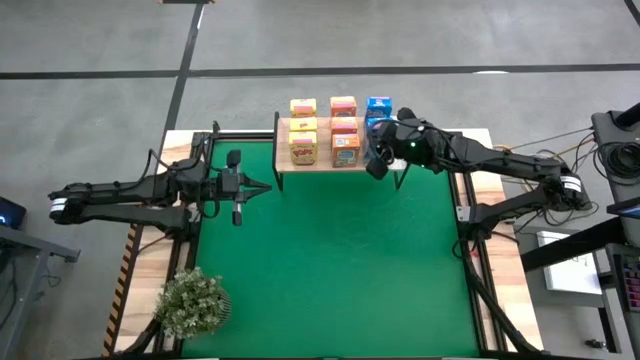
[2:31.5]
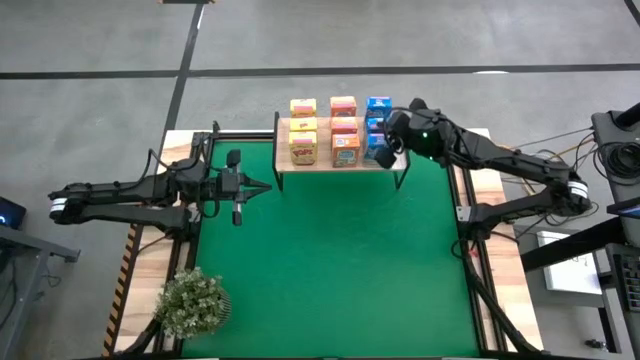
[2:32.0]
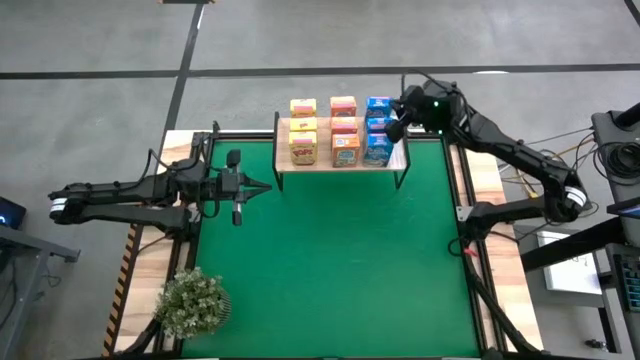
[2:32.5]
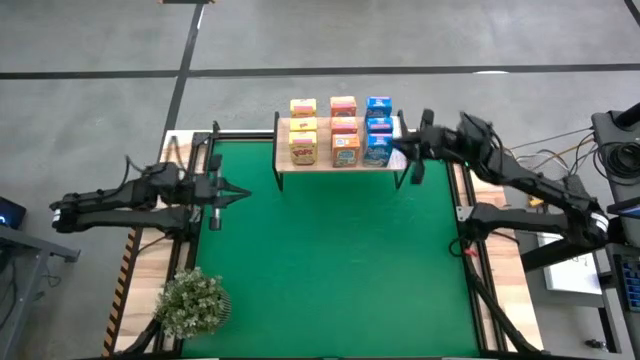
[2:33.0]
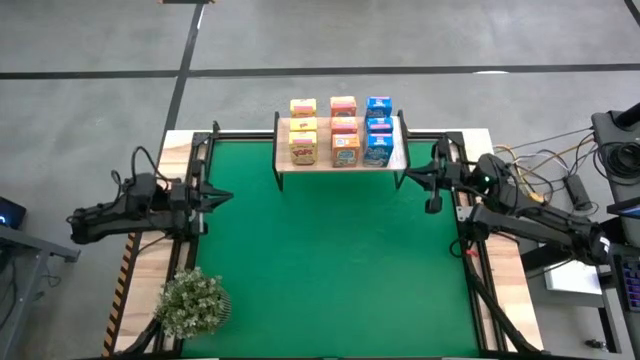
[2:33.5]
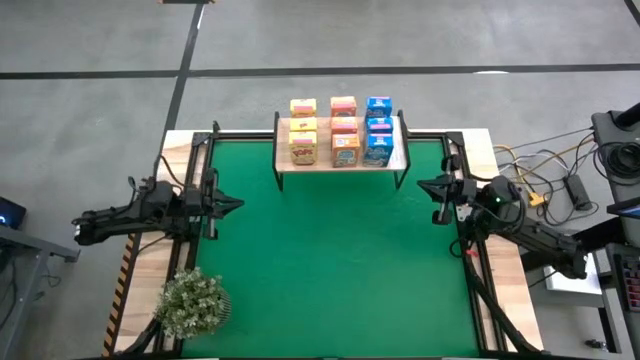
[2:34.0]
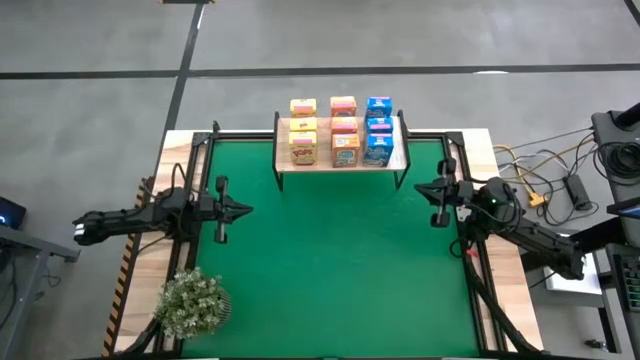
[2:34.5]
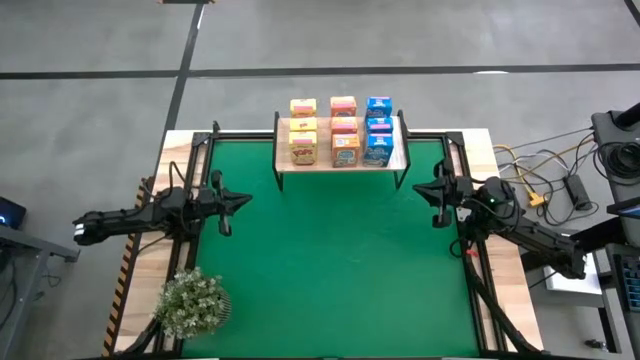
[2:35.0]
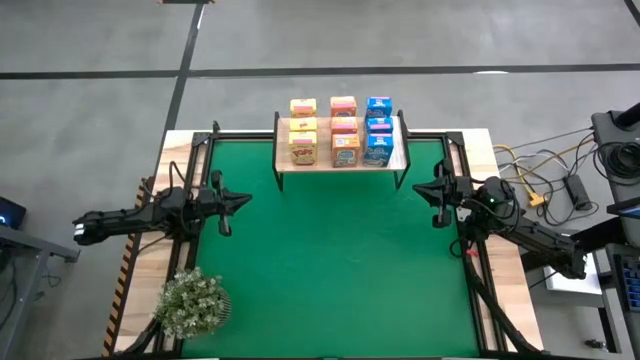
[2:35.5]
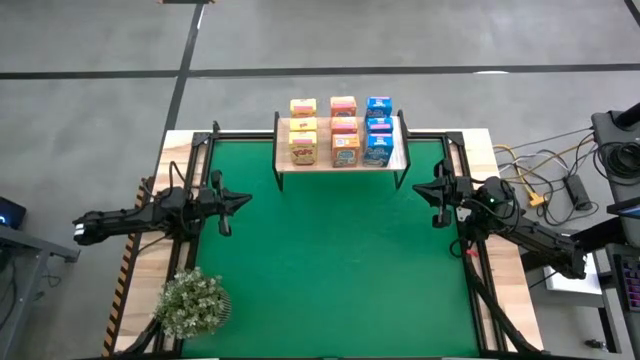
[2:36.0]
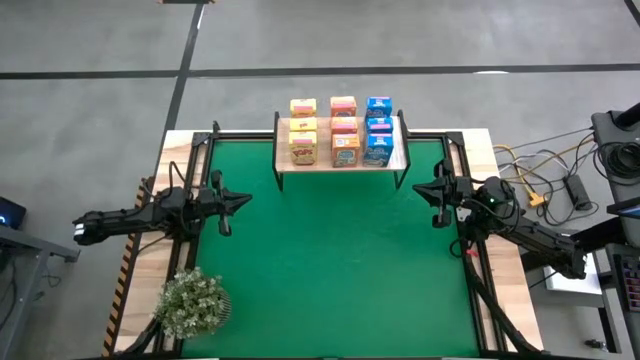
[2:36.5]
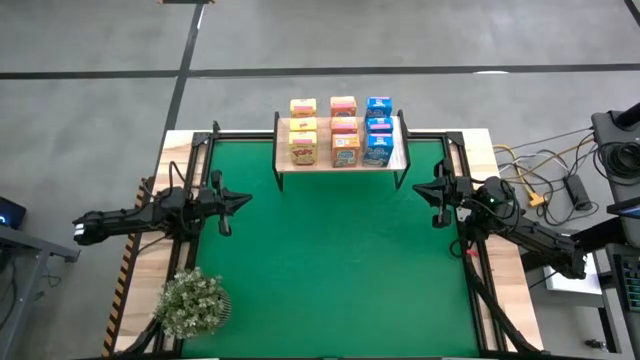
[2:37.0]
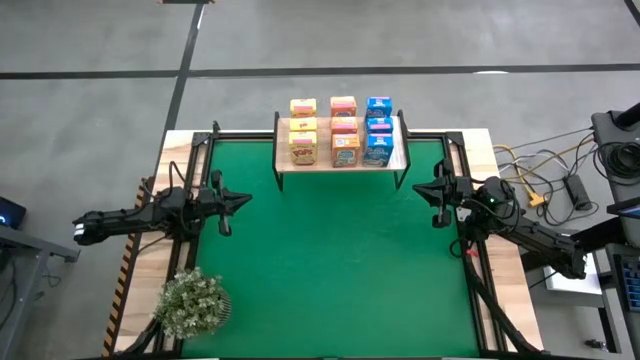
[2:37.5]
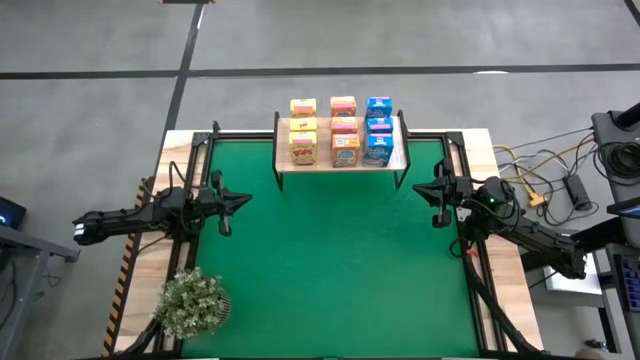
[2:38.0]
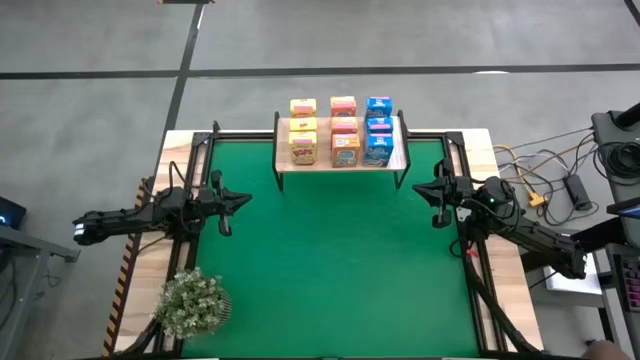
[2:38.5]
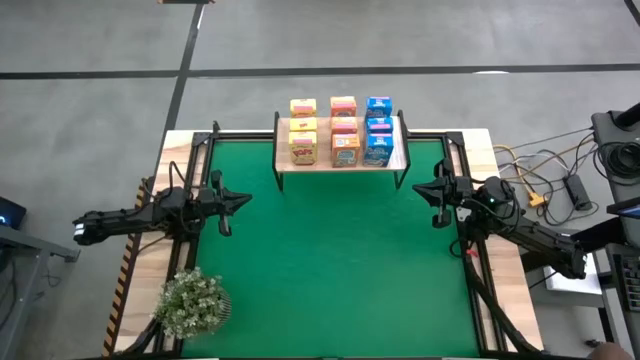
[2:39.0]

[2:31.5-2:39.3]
Task: Stack cereal on shelf
Return to Home Position

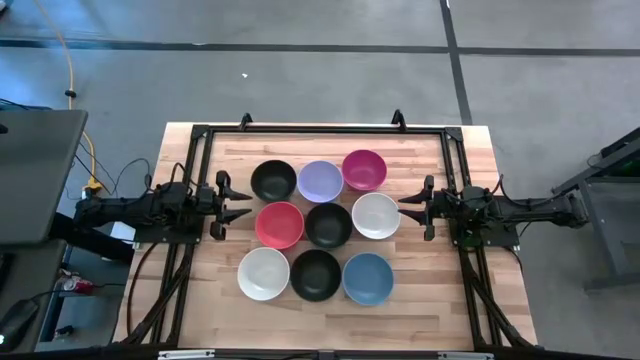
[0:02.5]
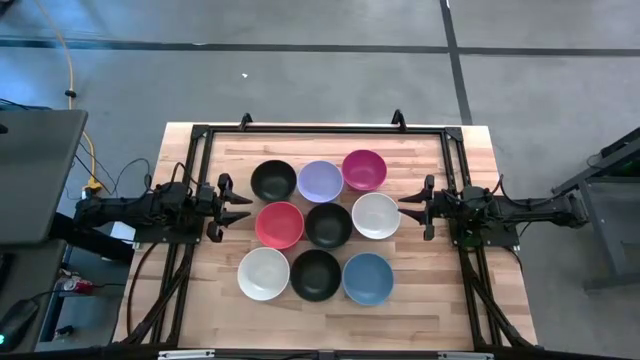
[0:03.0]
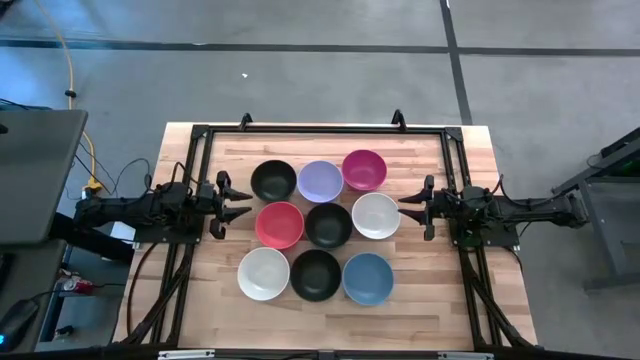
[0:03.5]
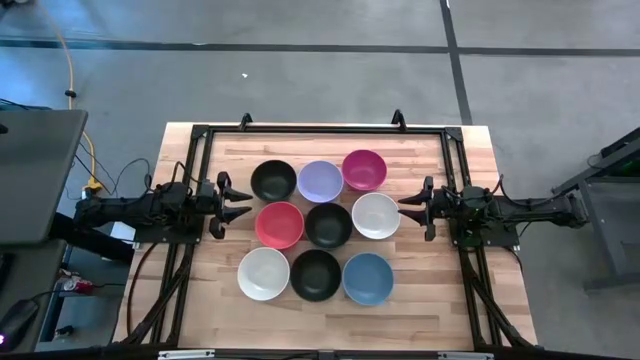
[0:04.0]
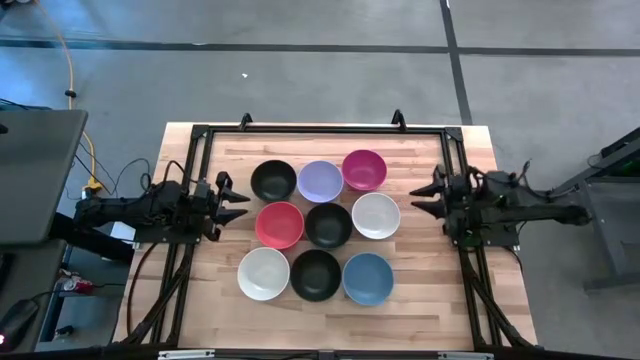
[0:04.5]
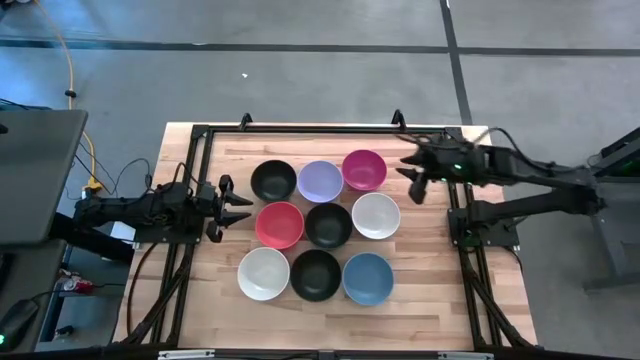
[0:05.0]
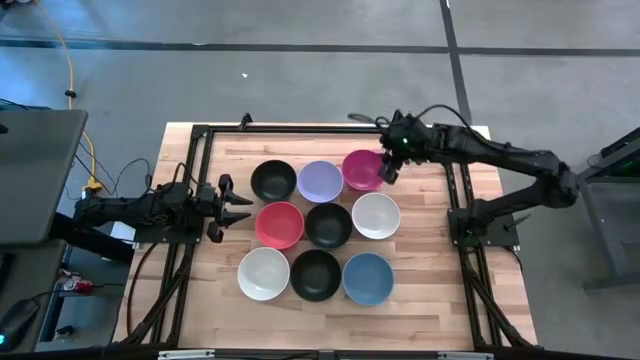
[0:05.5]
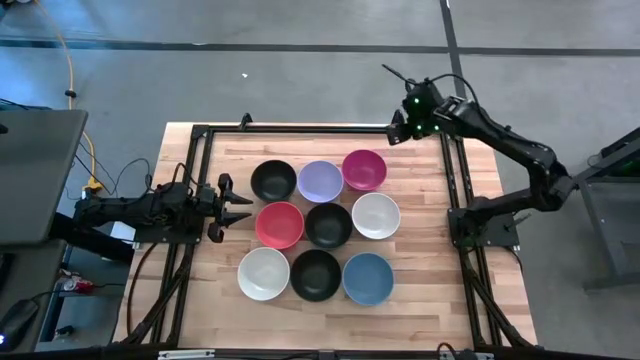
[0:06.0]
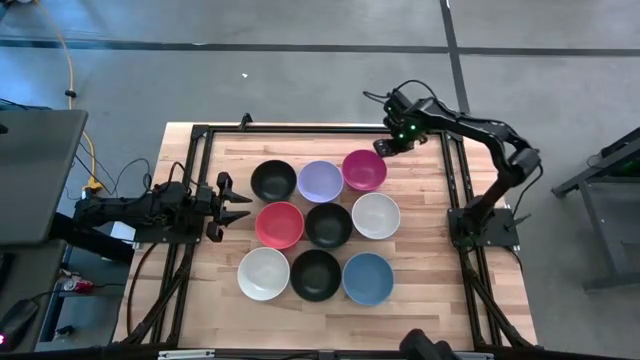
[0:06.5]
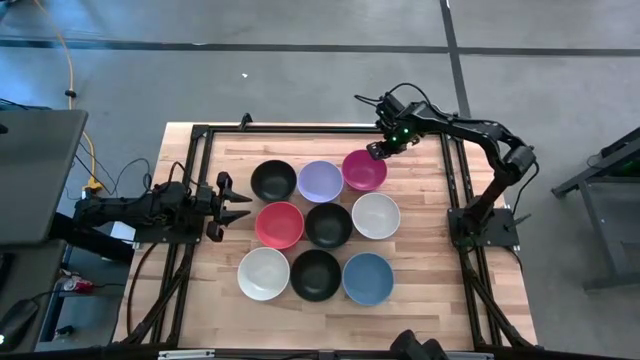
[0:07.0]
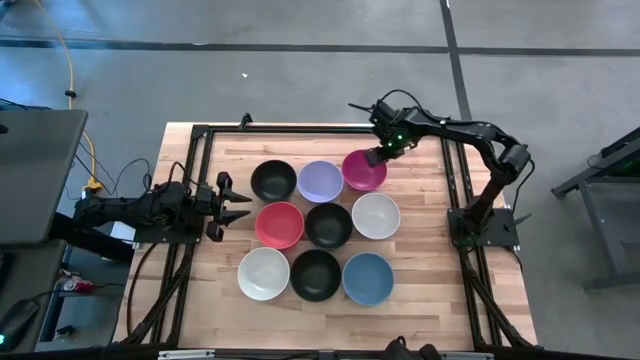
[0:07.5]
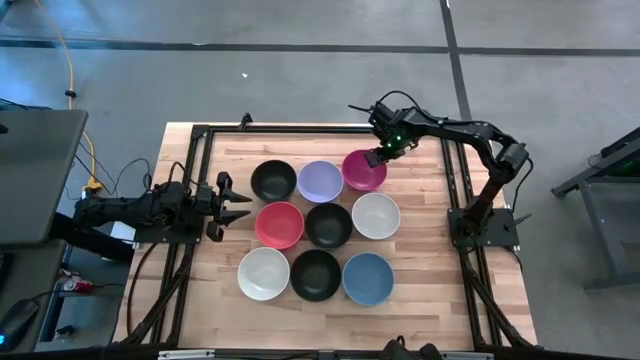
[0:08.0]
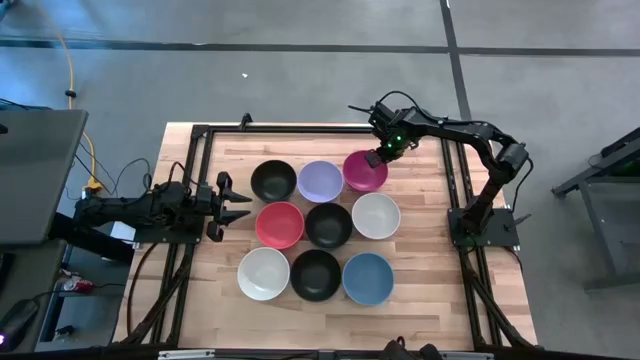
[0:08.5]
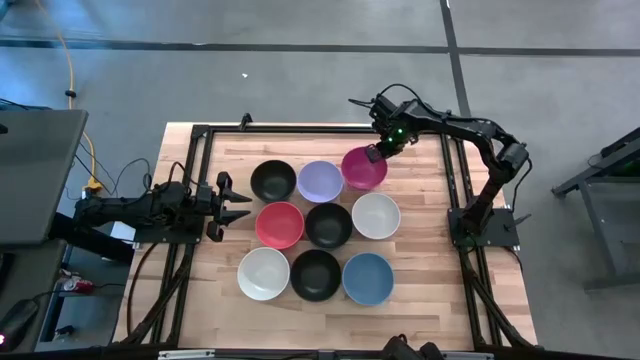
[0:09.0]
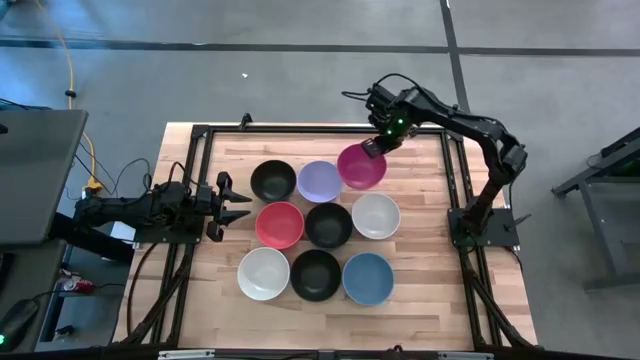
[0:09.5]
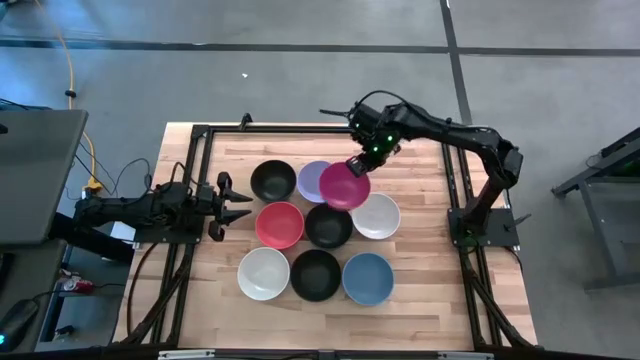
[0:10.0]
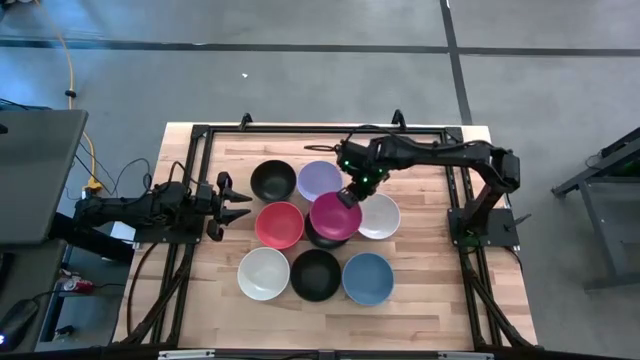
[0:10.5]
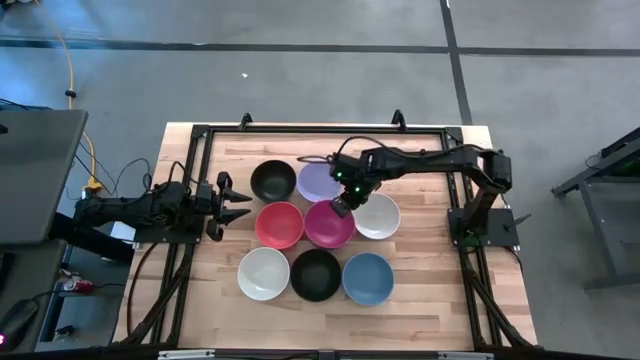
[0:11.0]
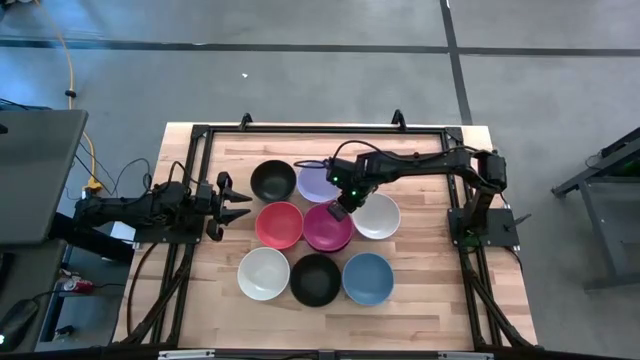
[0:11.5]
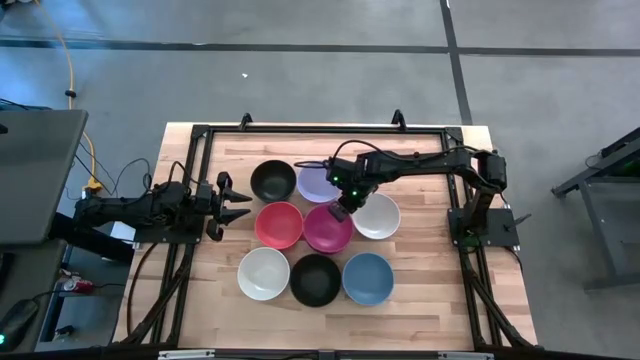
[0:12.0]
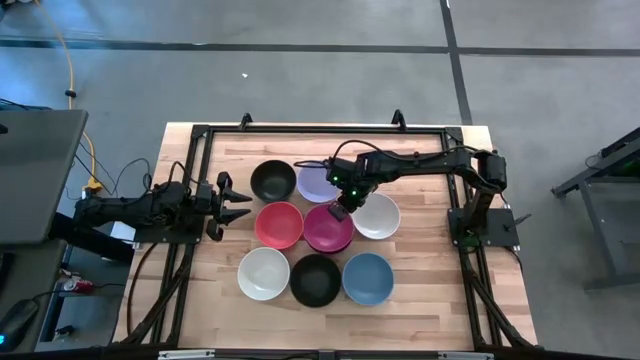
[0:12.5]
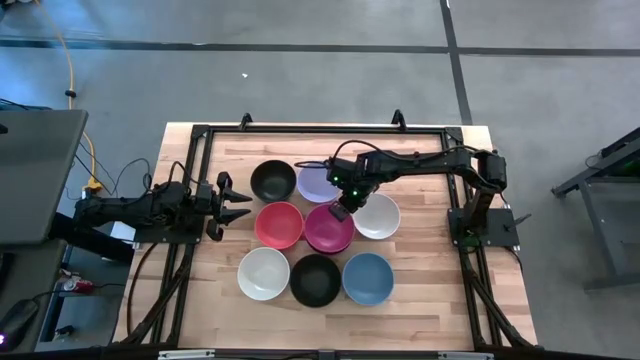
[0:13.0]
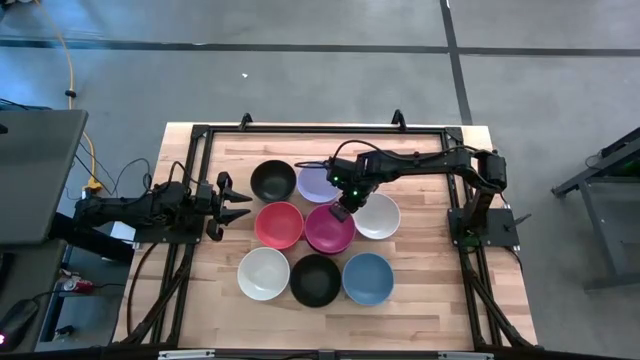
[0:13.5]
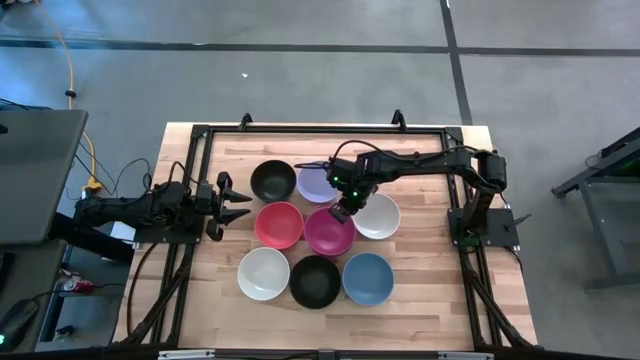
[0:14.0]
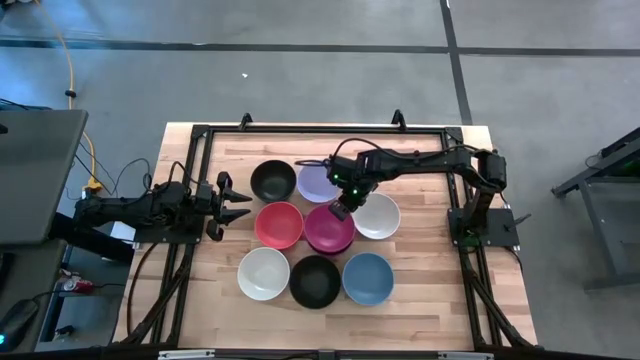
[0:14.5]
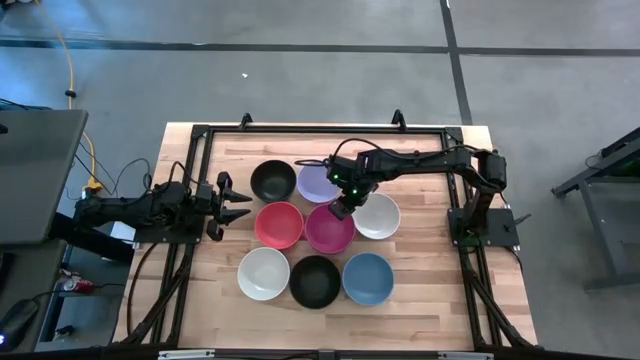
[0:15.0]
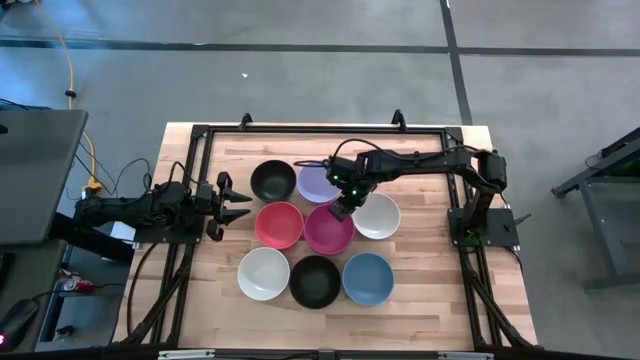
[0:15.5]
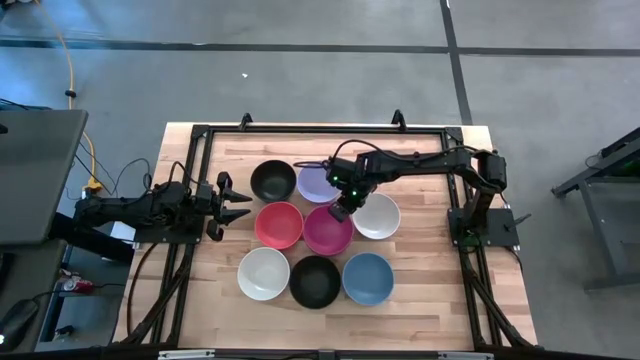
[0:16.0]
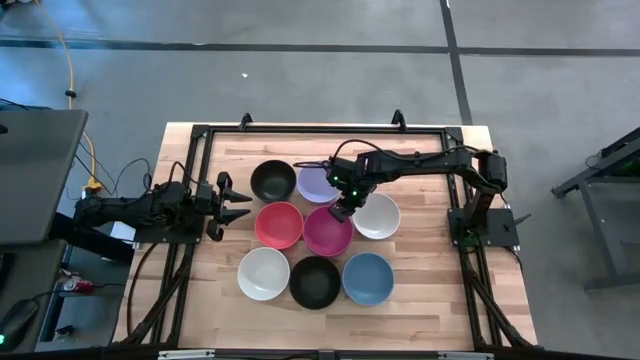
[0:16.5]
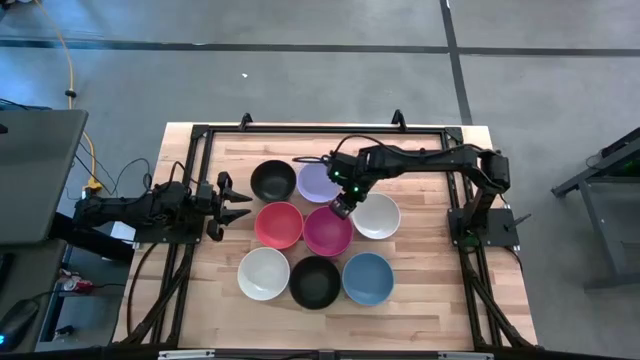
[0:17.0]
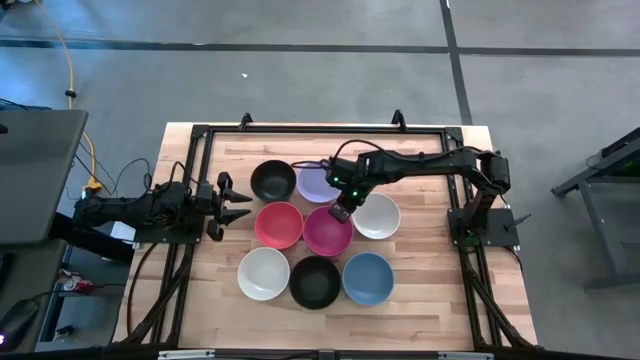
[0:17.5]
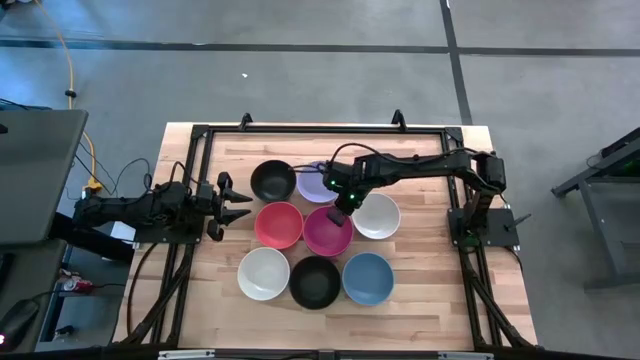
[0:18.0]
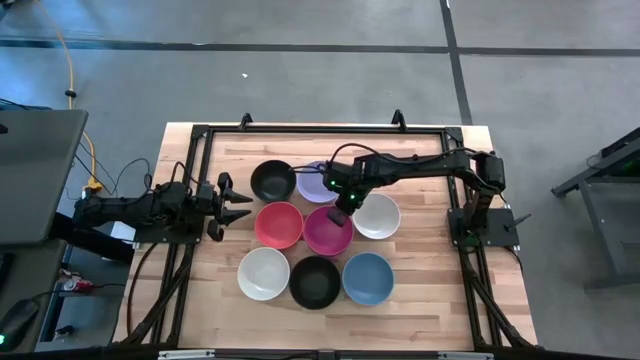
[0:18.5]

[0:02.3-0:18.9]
Task: Nest bowls inside each other
Stack the pink bowl on top of the center black bowl
